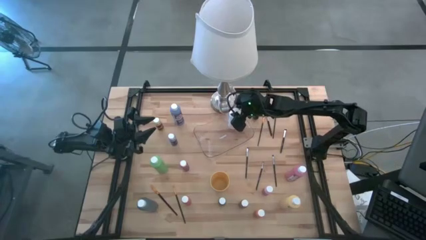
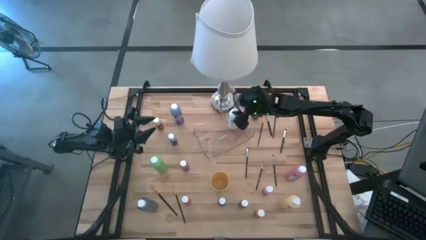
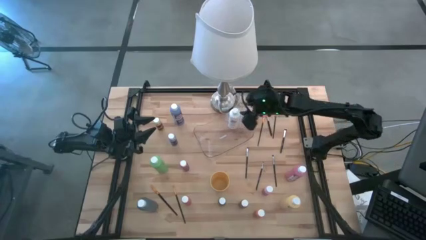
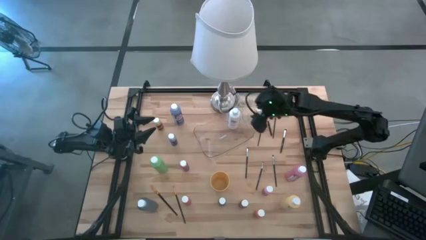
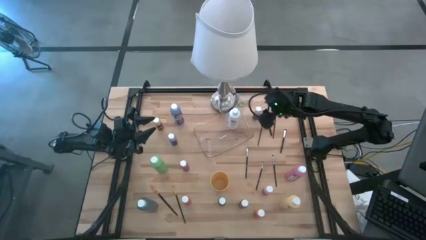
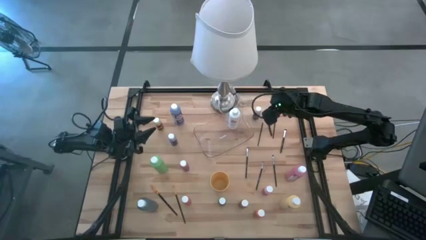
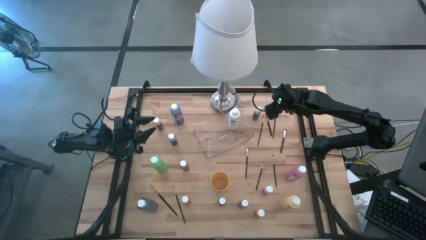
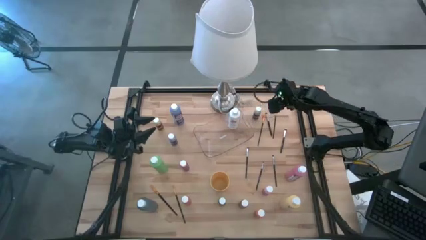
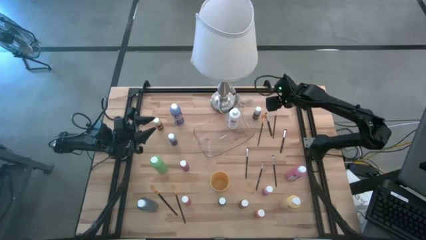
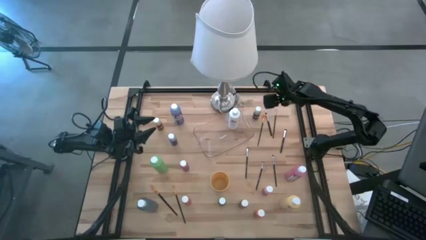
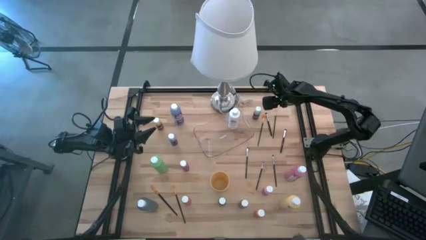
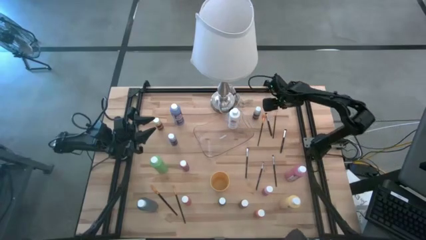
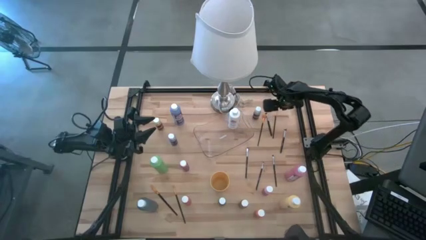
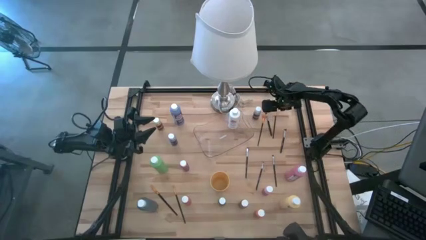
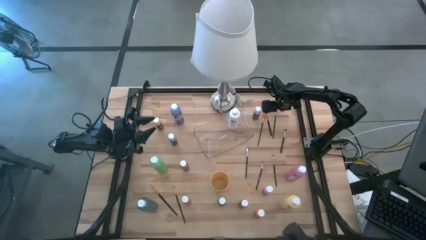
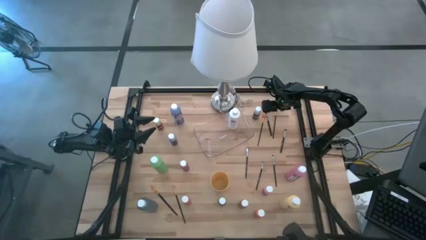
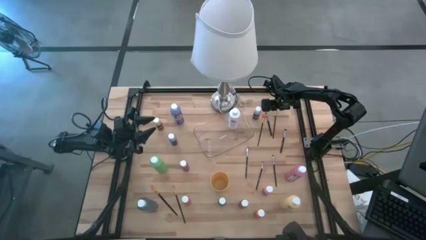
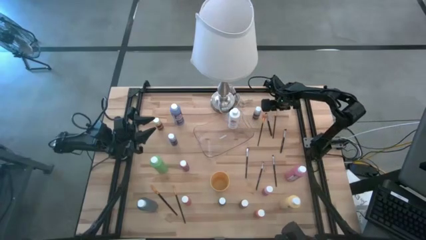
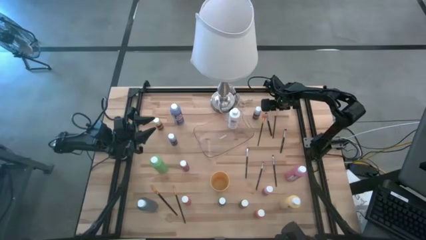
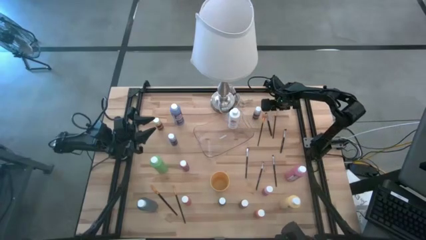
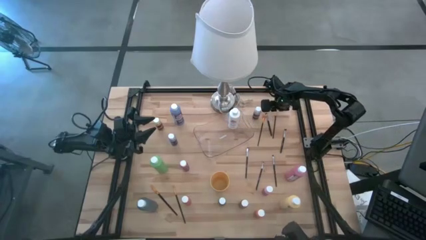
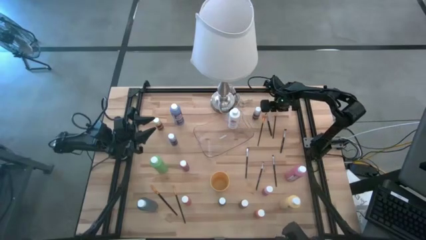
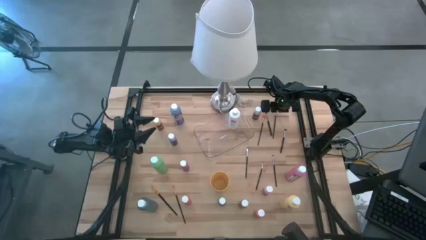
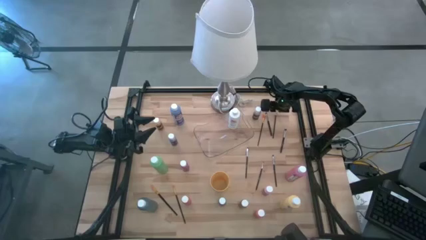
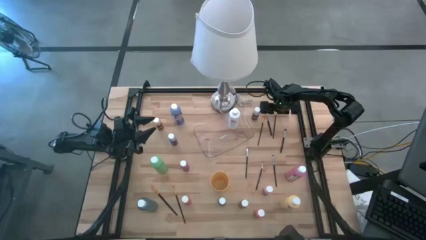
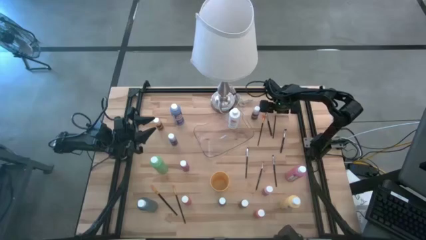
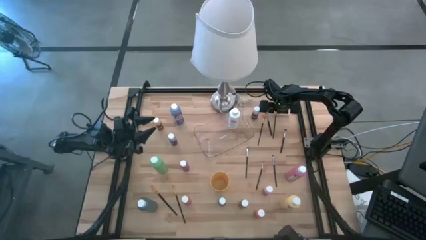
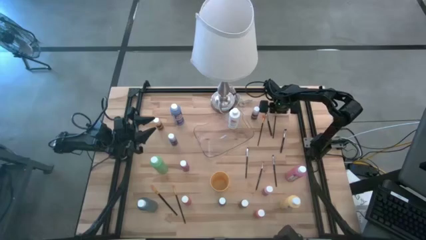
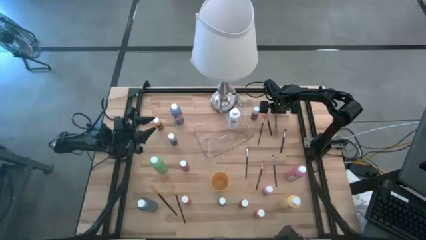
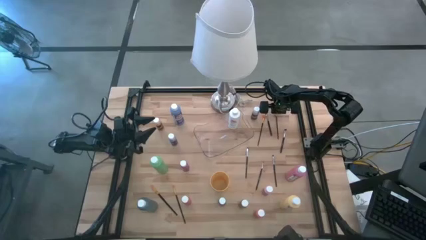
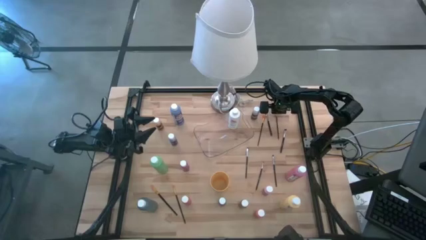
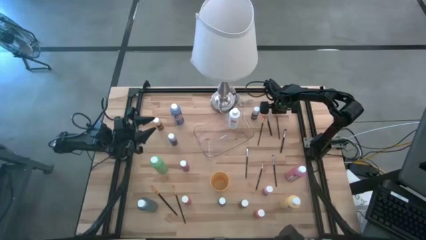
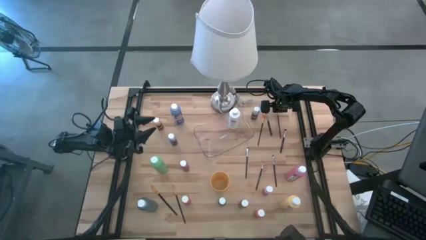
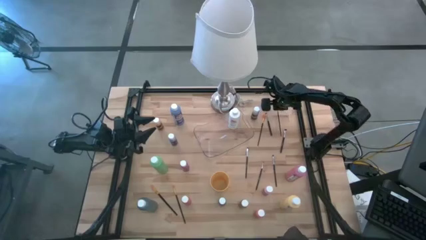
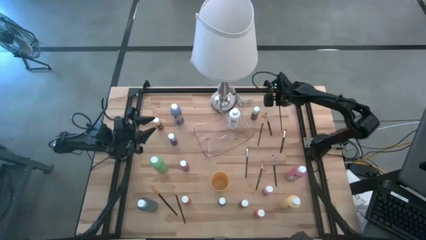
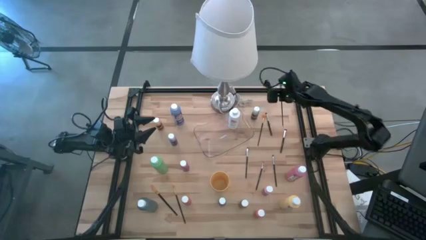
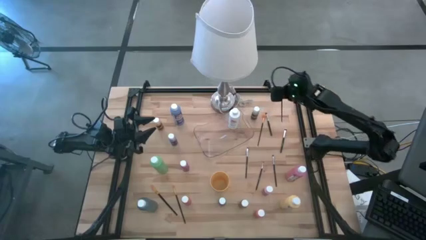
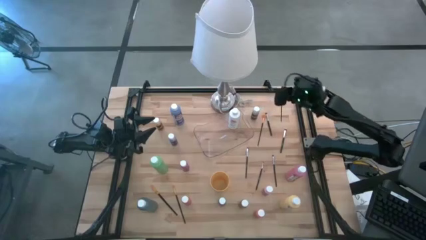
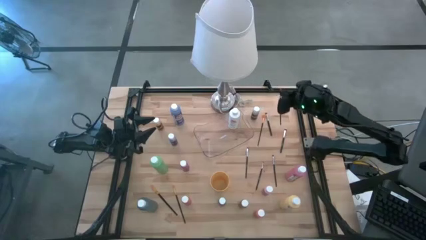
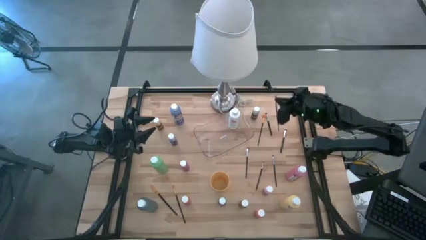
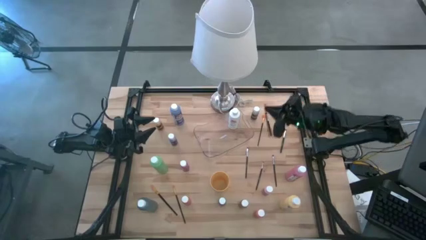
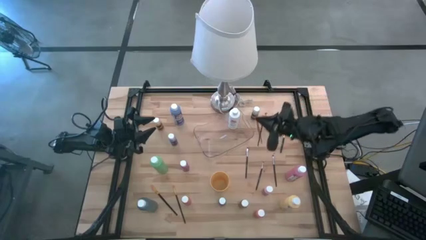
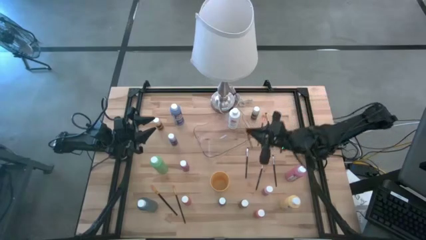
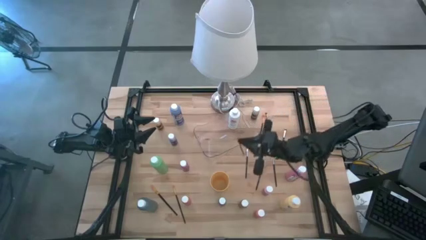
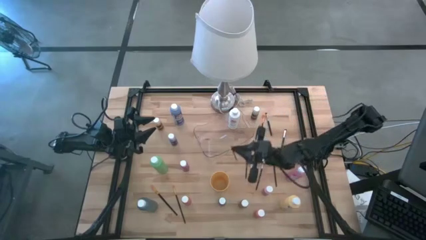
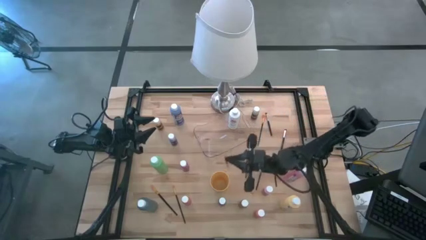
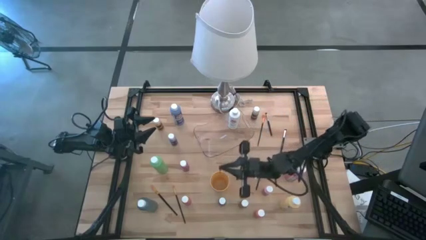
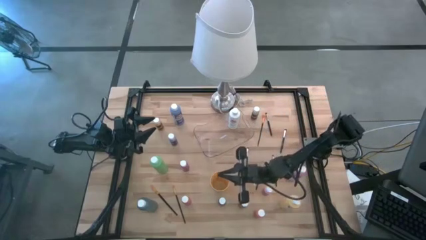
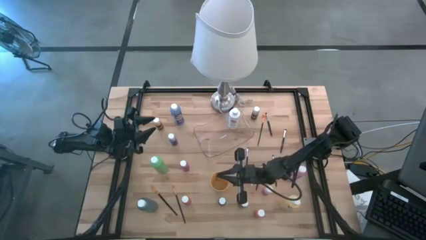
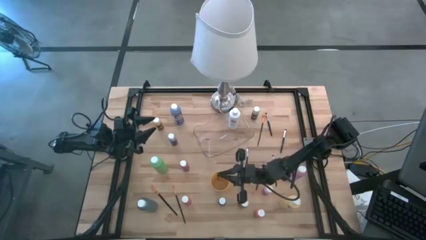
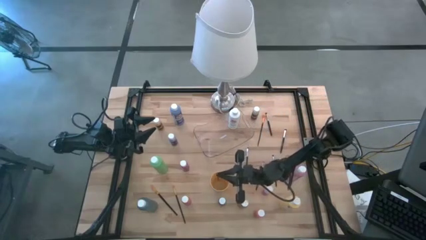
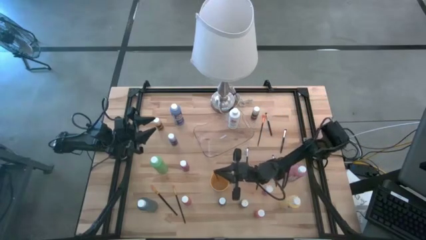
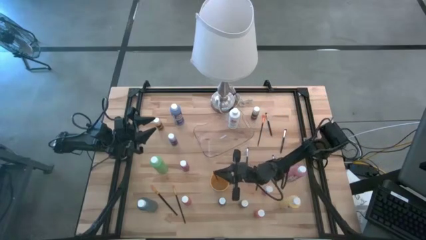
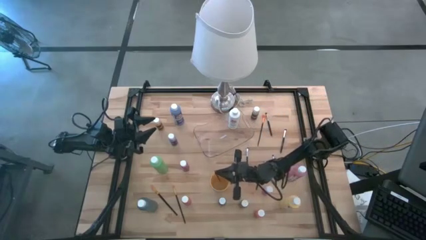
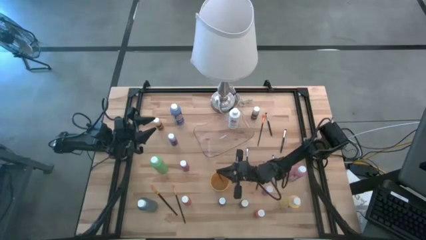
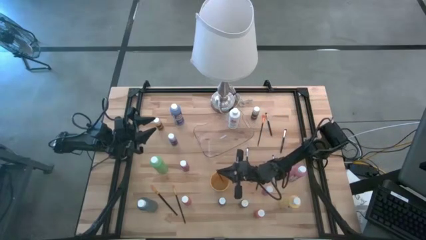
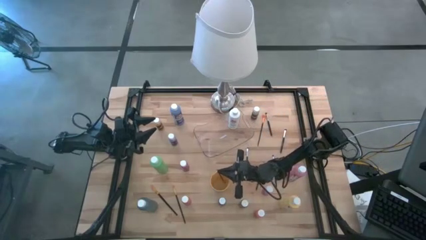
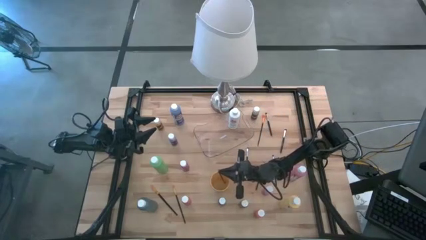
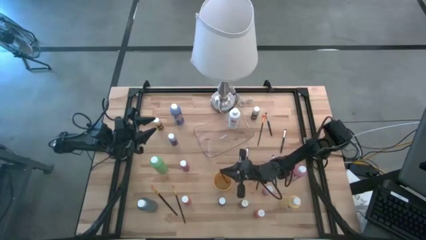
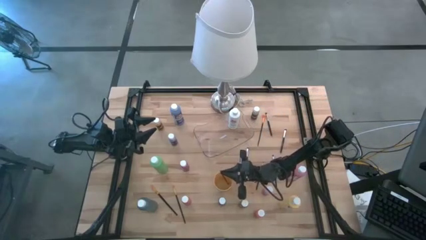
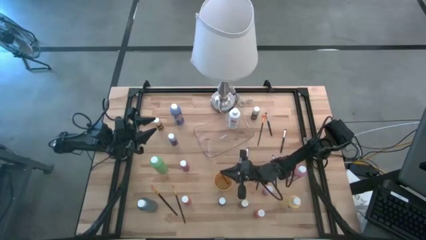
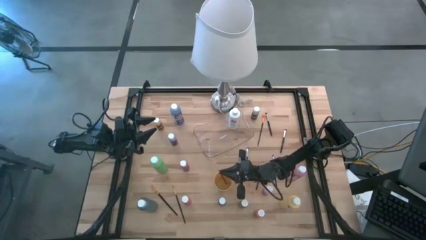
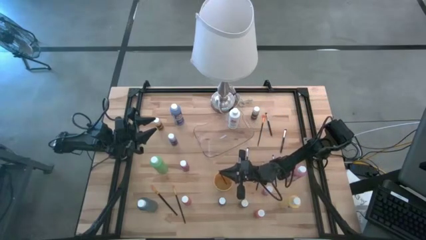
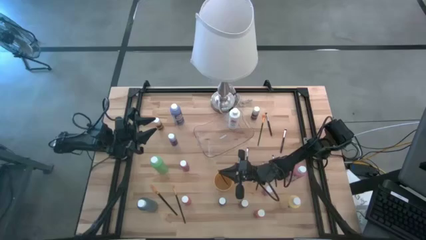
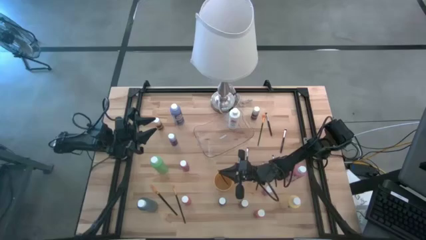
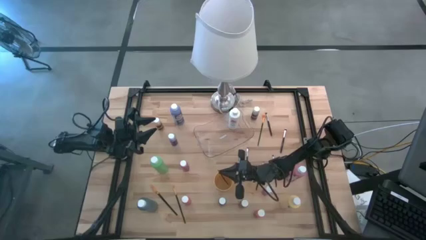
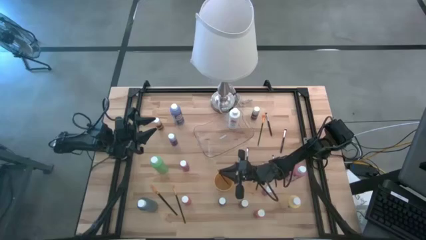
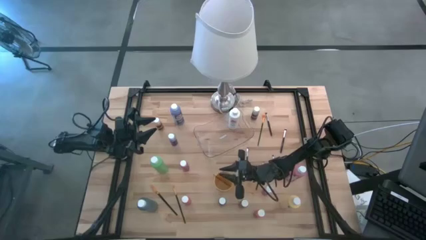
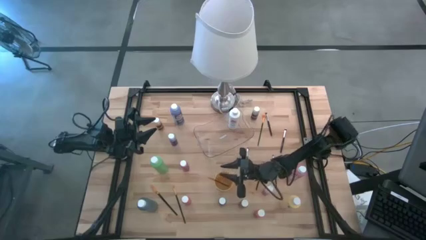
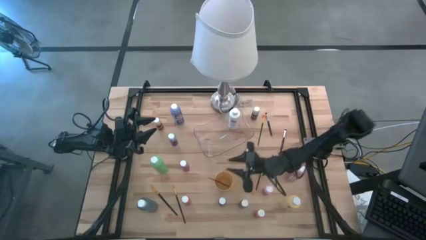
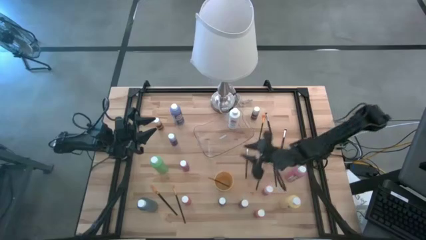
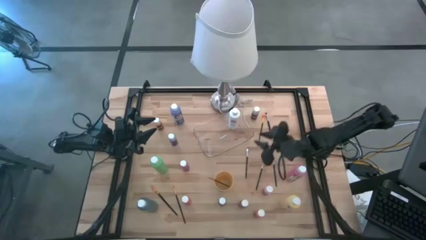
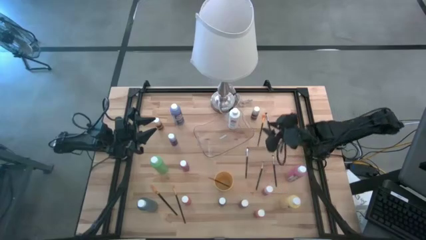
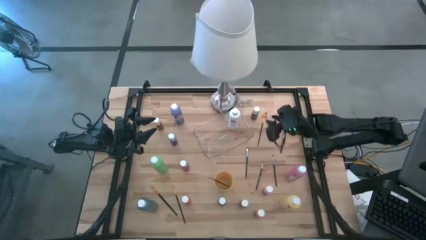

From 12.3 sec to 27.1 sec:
Task: Pick & Place Paint Supplies
Put the black paint brush into the yellow cup
